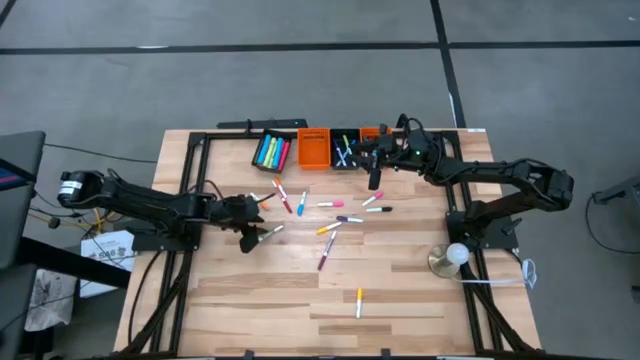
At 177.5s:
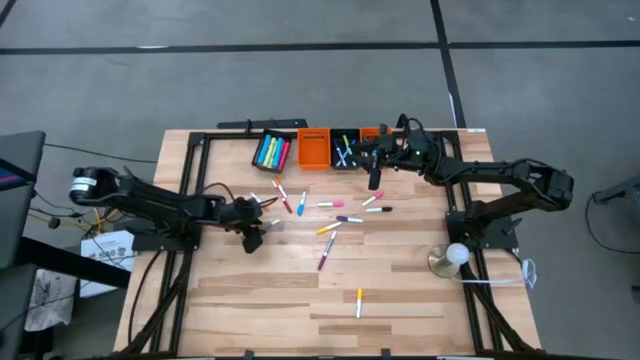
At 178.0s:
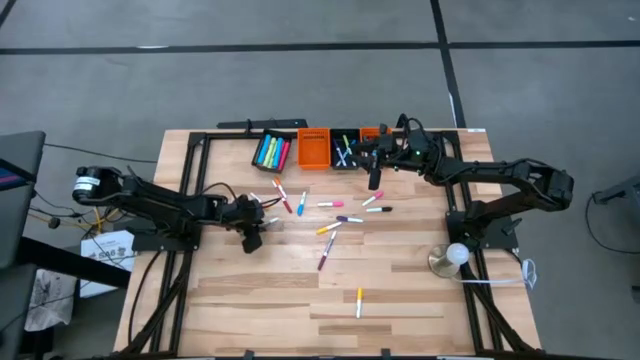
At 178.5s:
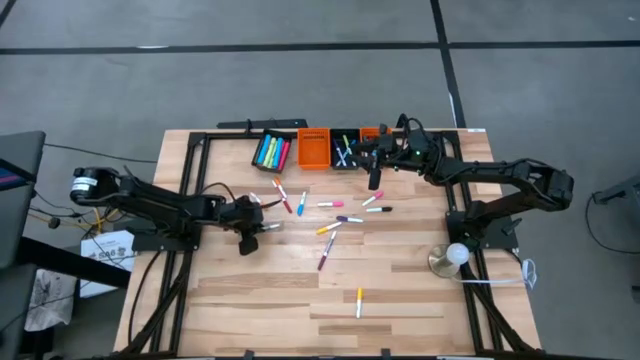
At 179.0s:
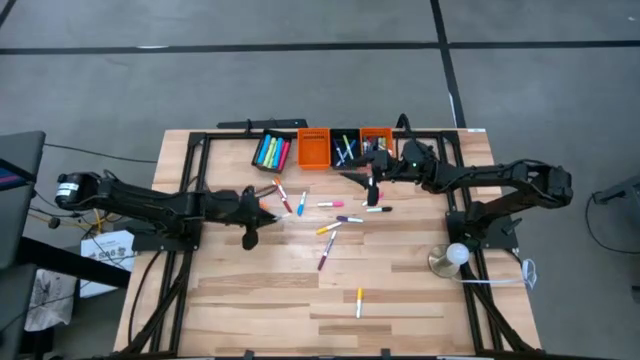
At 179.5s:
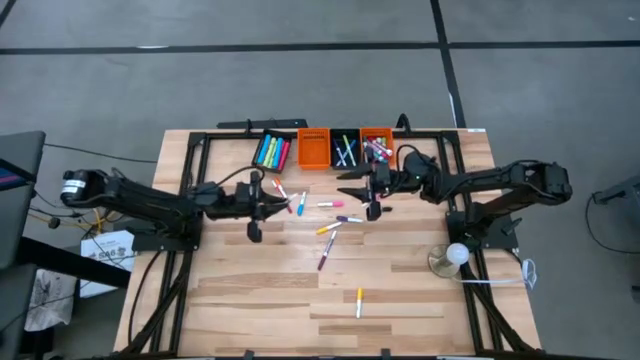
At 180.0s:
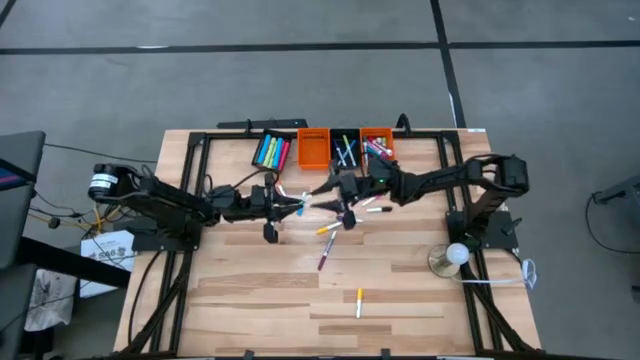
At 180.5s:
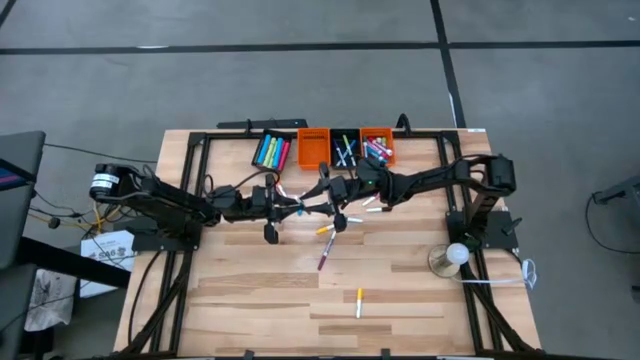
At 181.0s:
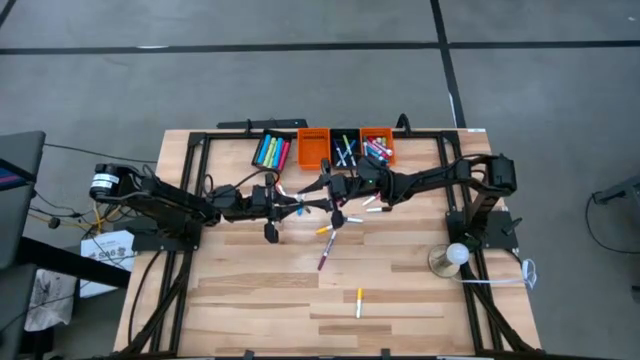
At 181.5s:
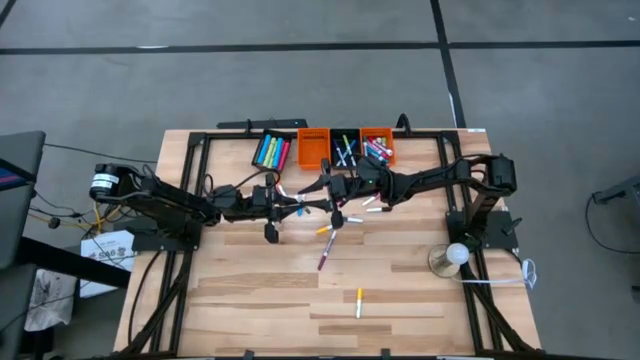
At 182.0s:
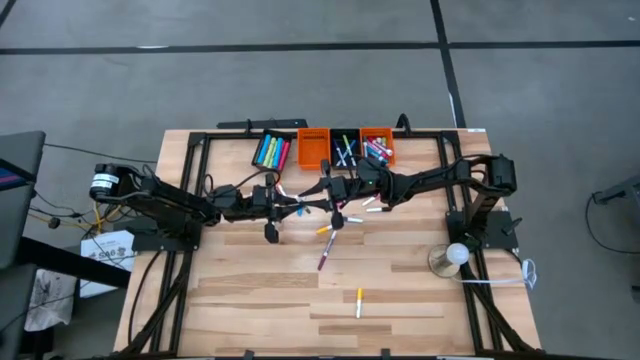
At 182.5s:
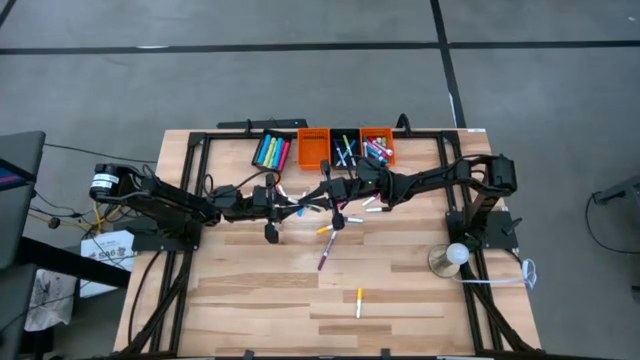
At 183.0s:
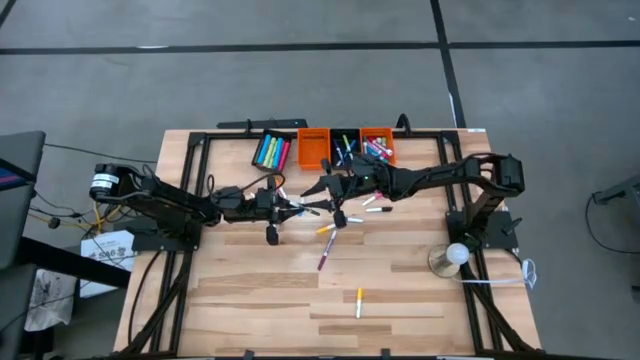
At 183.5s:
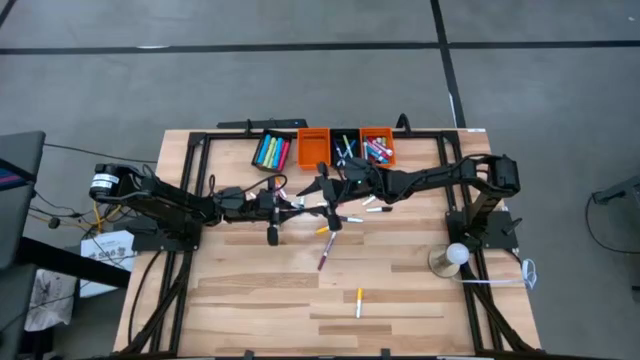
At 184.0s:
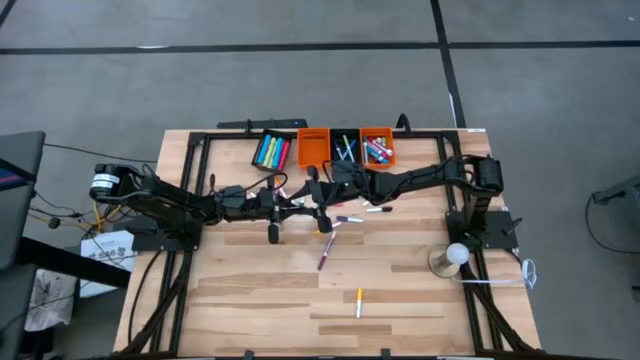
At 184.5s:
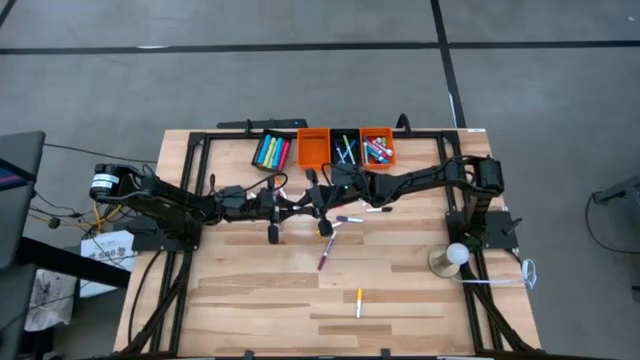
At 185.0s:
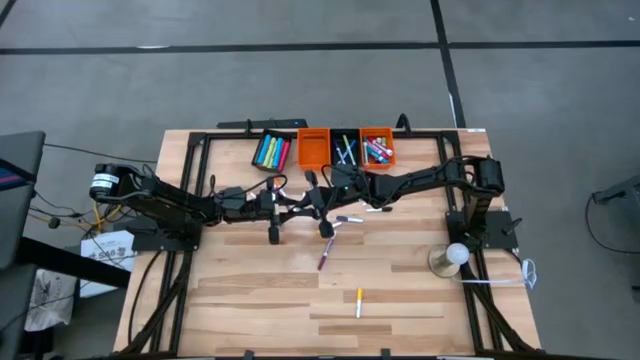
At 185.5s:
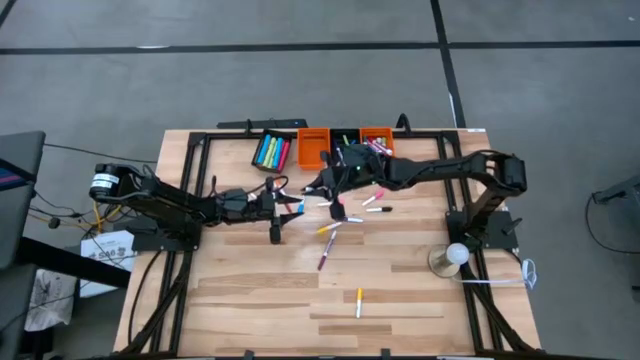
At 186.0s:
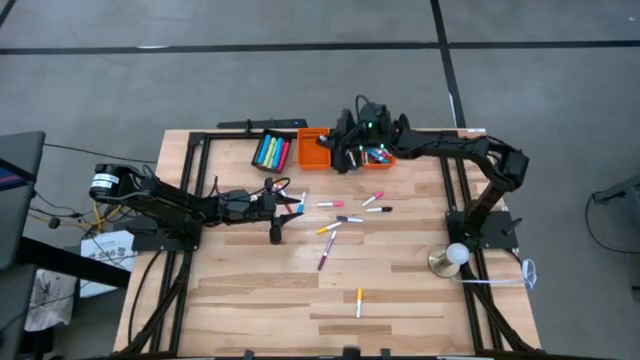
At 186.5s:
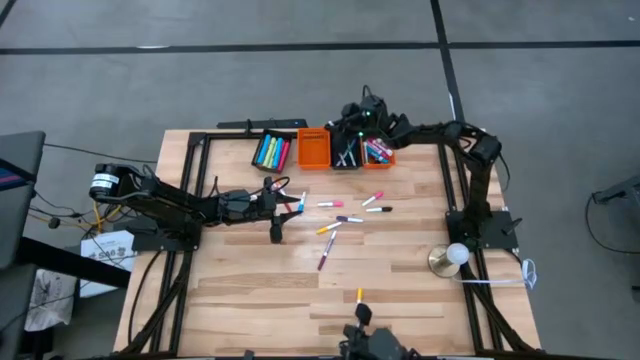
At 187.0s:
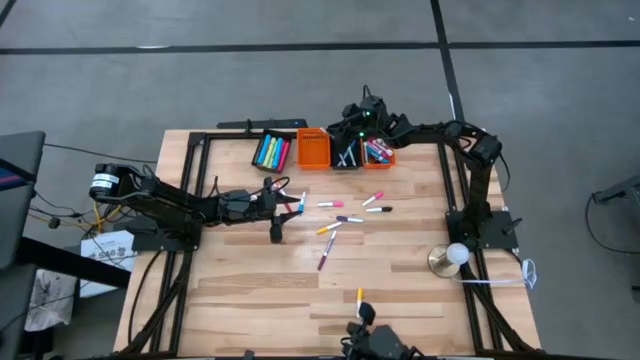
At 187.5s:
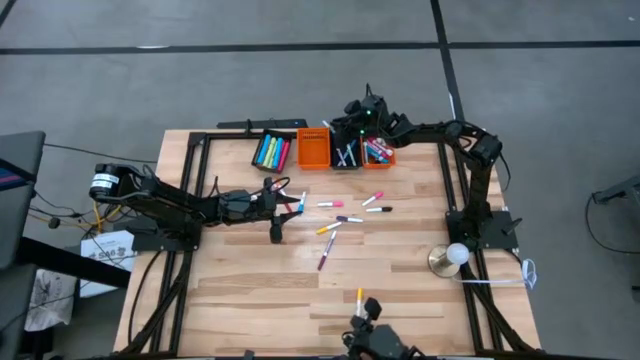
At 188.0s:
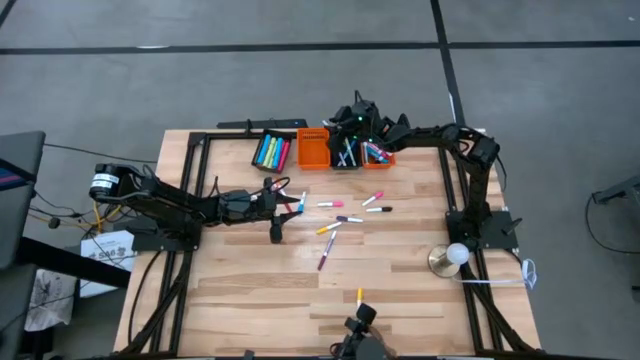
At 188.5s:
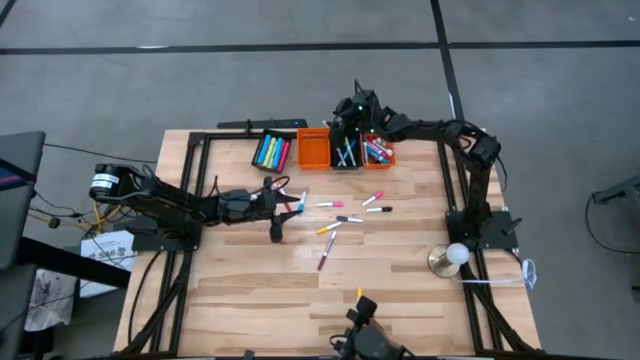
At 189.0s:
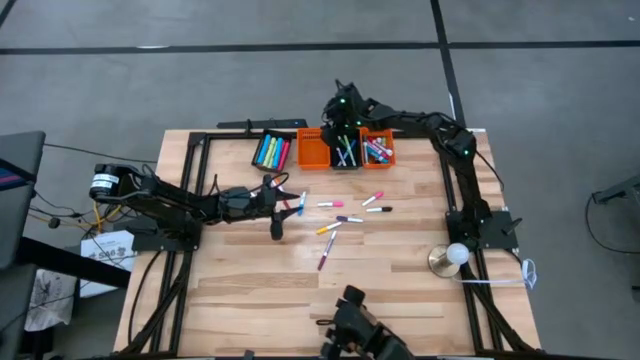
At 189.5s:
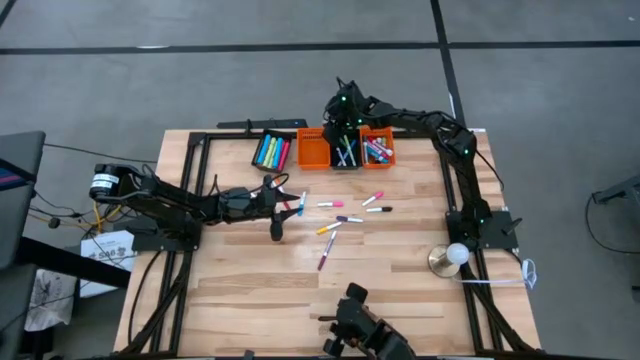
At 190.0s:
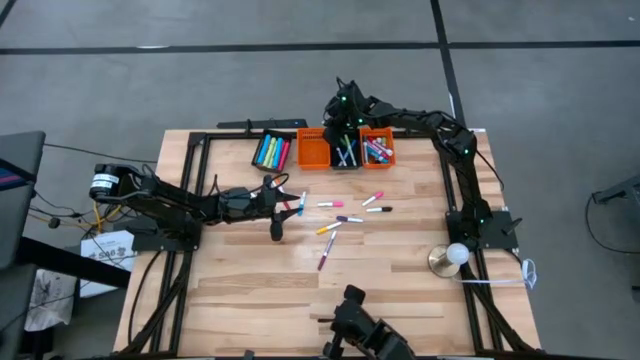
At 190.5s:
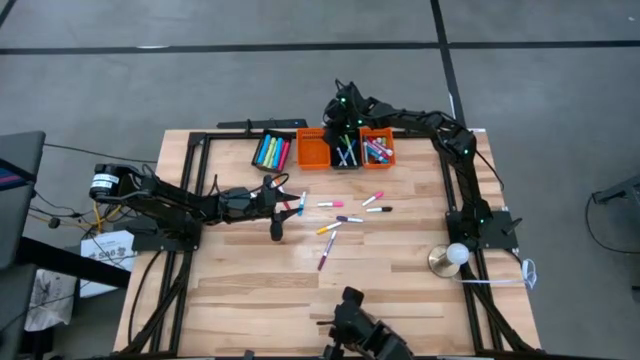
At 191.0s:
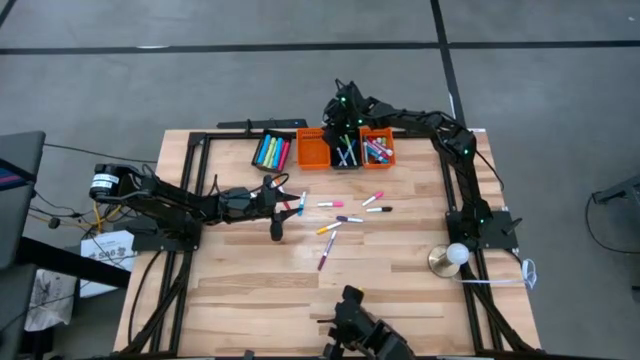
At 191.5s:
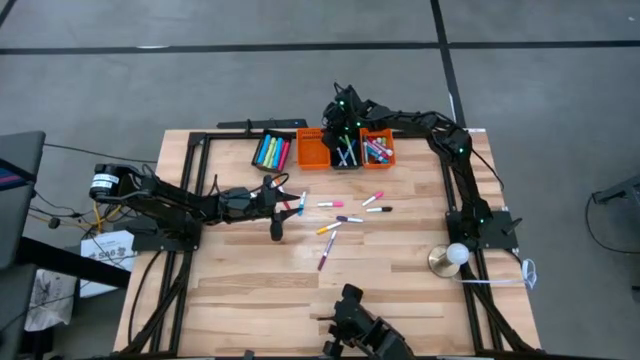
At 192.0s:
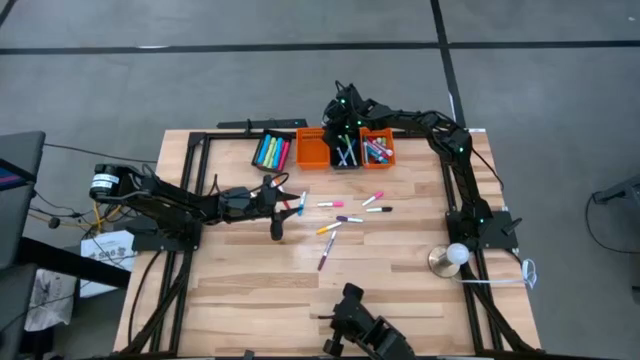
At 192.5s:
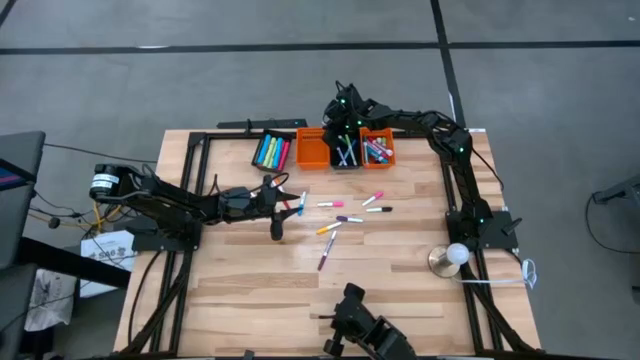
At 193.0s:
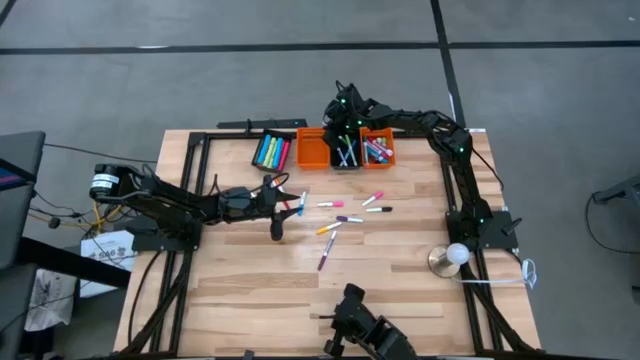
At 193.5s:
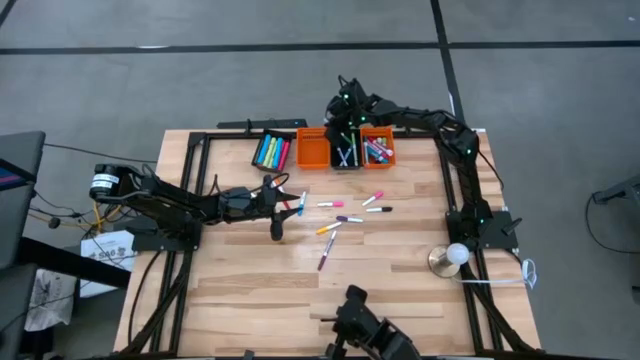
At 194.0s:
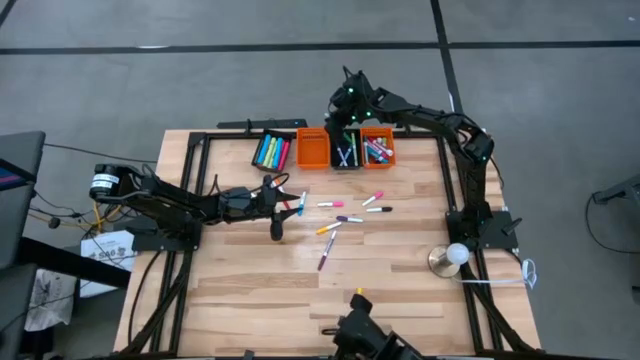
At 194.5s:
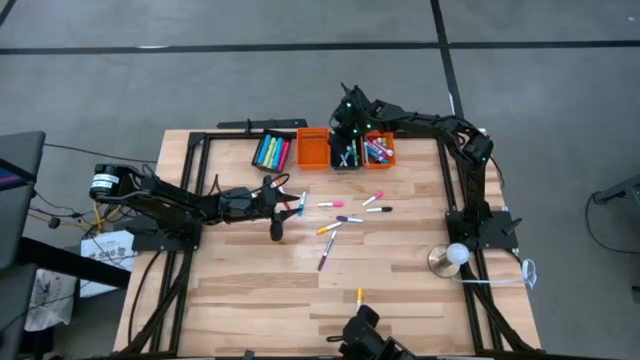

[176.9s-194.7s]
Task: Pick & Place Markers
Put the small green marker pen into the right black basket

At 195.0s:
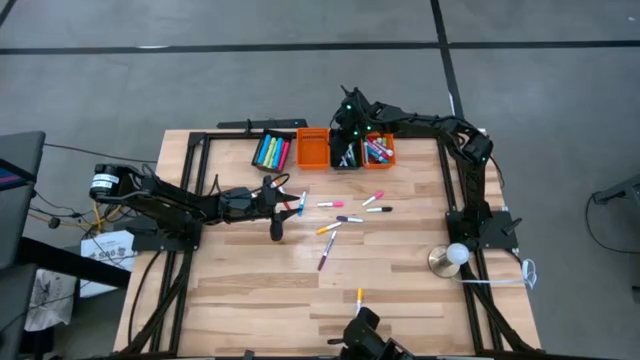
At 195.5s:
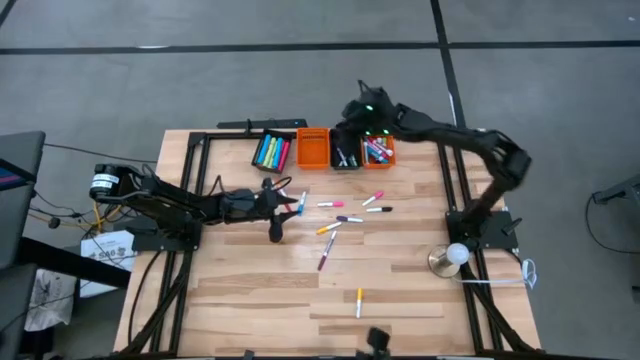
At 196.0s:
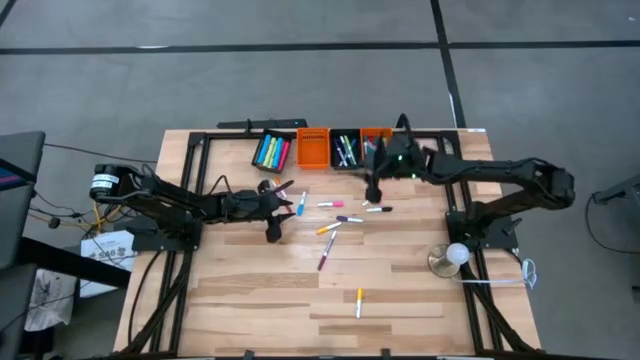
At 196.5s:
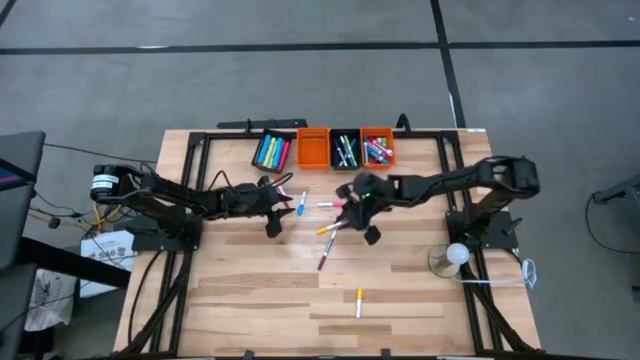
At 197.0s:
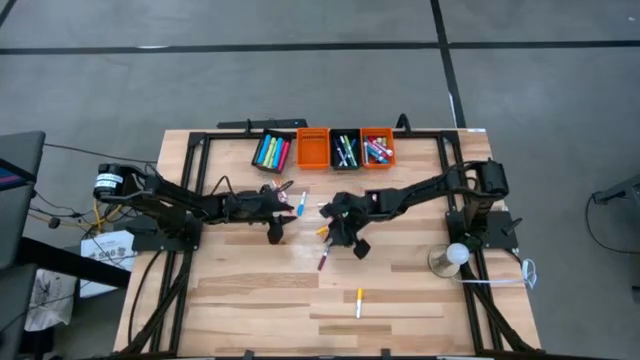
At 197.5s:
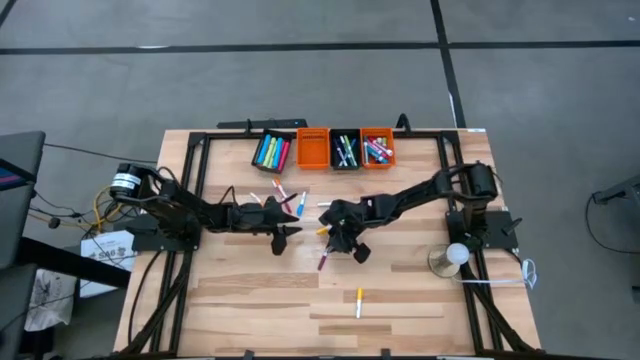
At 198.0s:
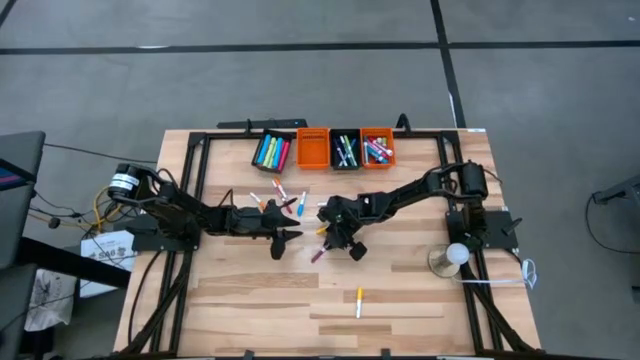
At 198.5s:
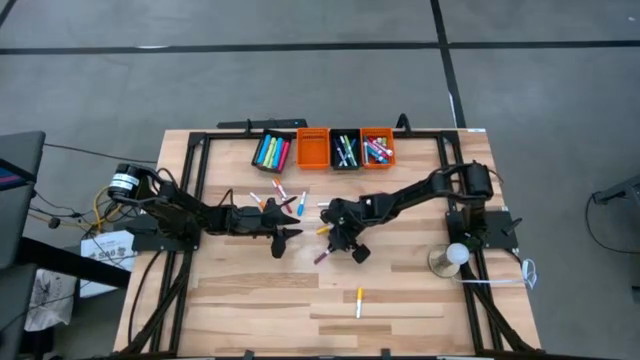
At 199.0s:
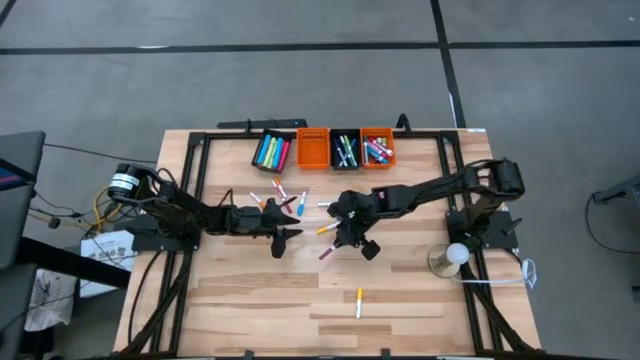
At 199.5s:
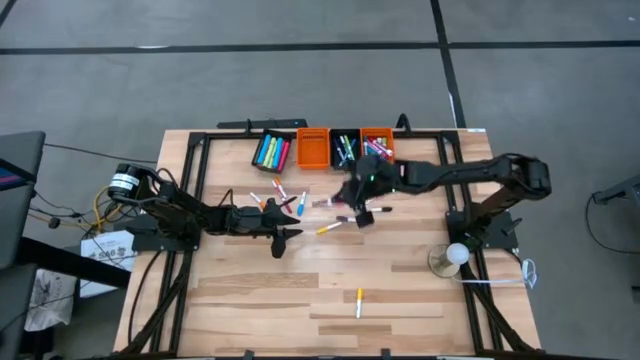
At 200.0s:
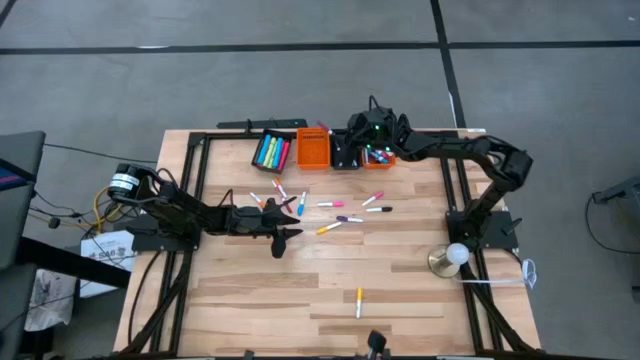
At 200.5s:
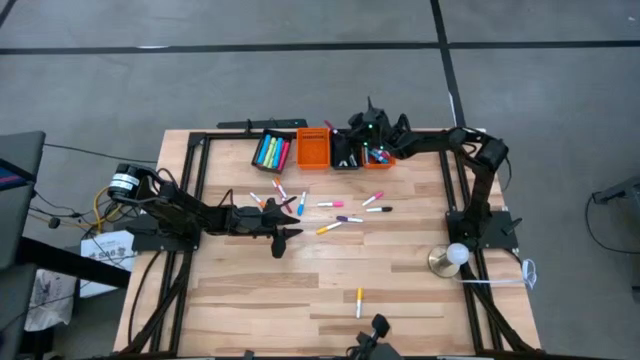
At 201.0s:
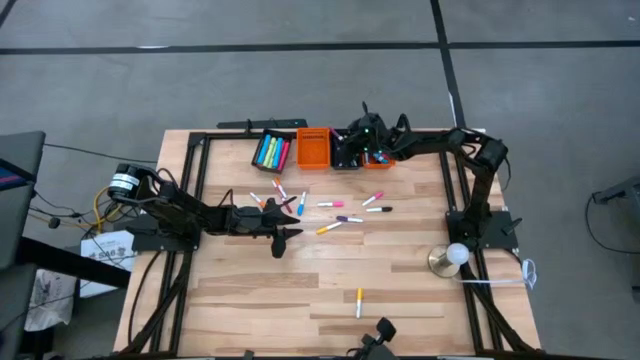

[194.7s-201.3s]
Put the small purple marker pen into the right black basket
